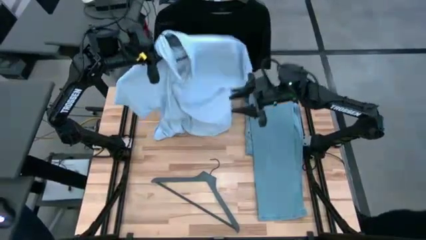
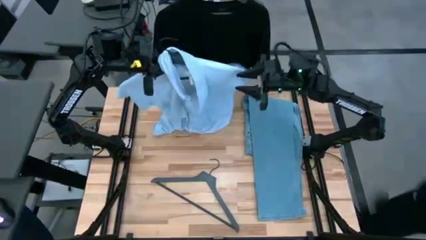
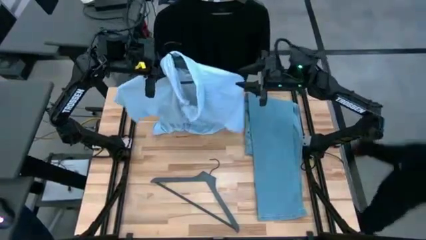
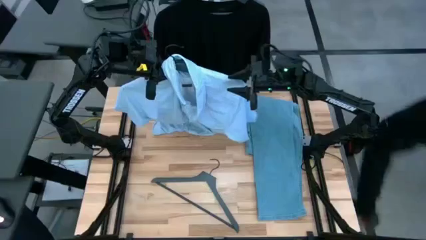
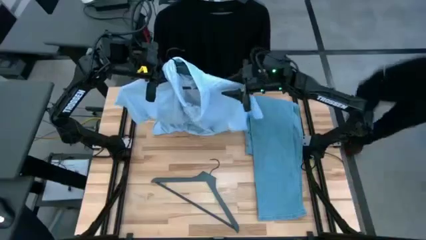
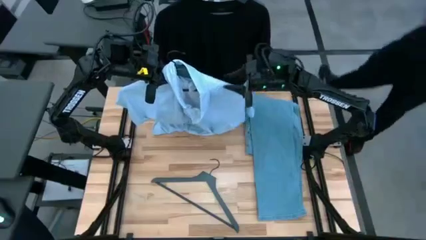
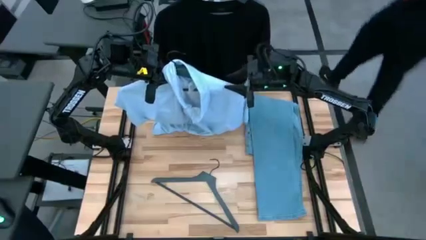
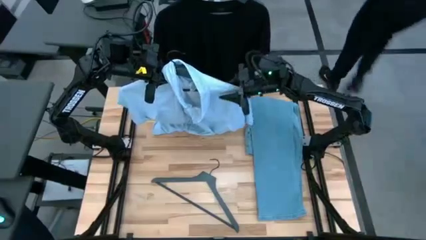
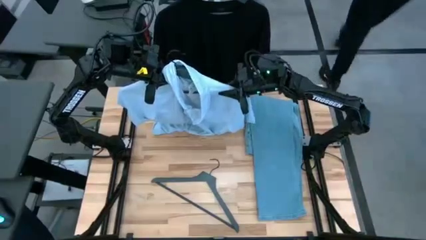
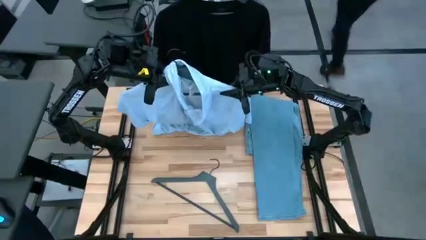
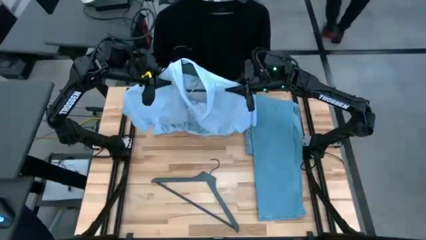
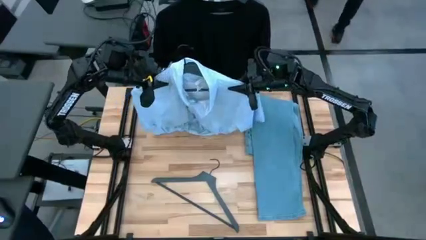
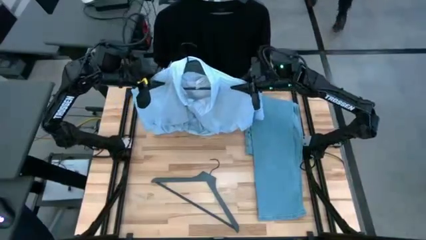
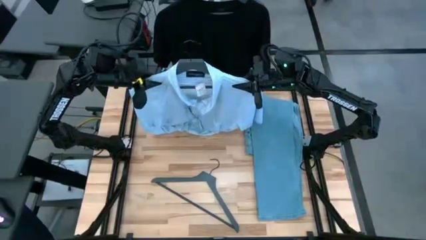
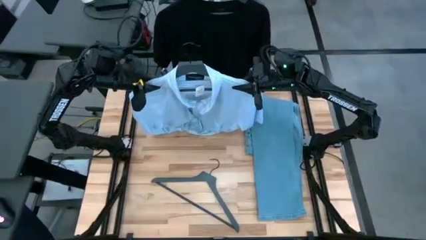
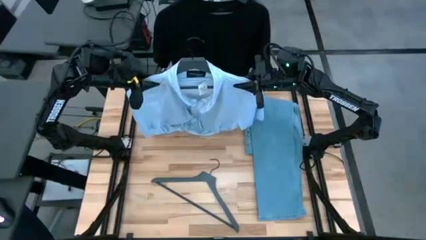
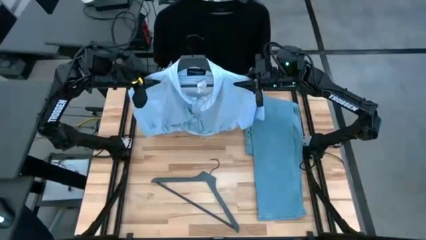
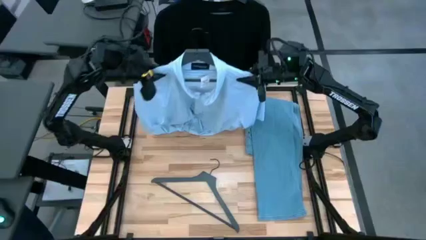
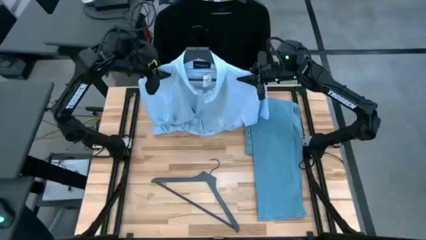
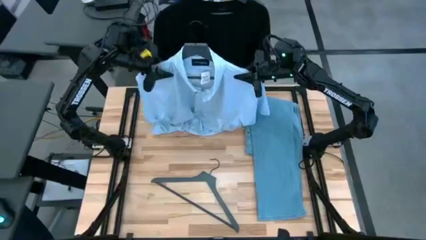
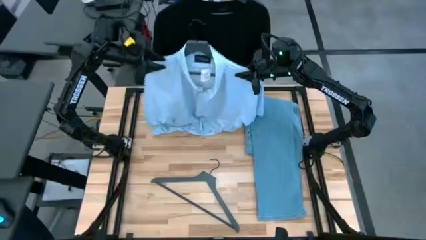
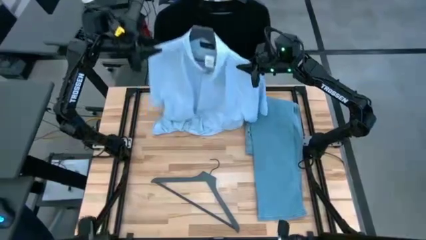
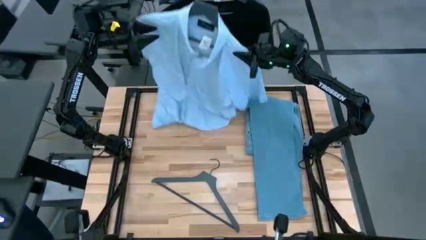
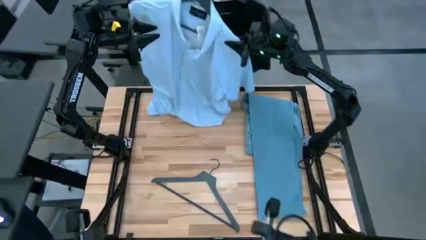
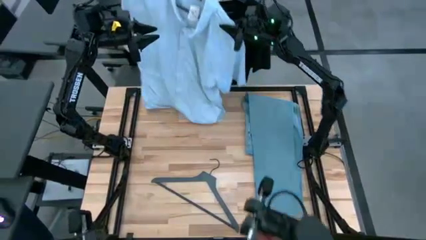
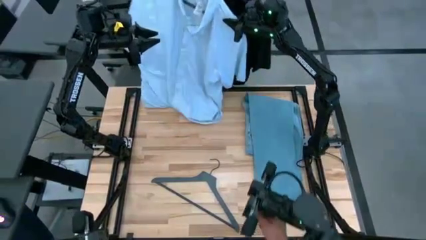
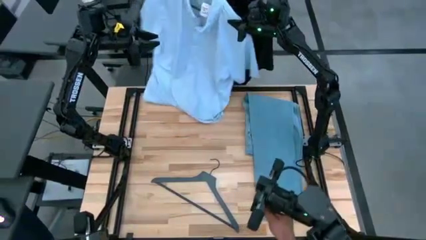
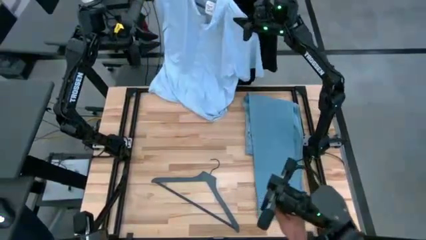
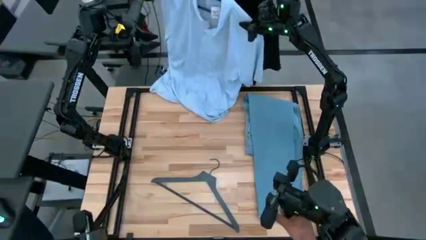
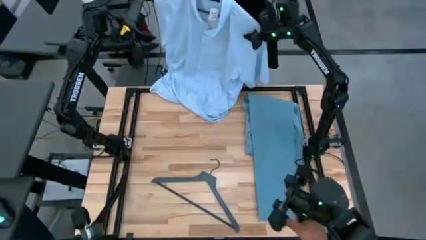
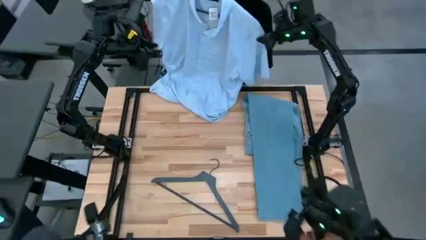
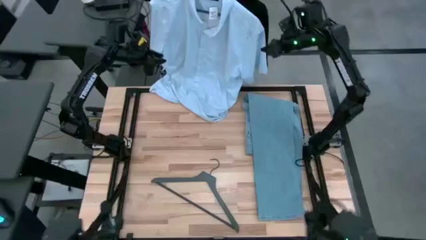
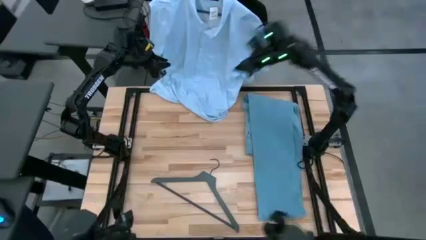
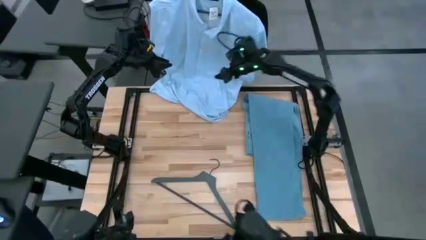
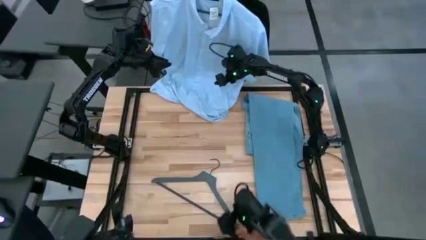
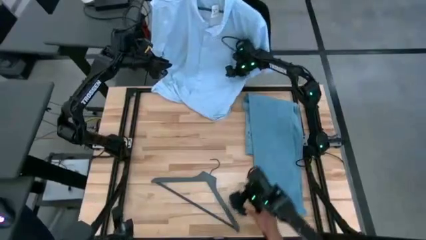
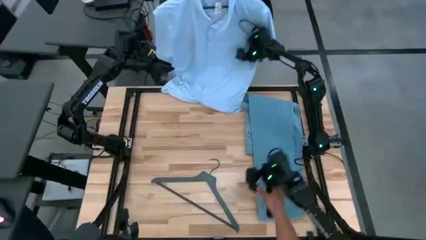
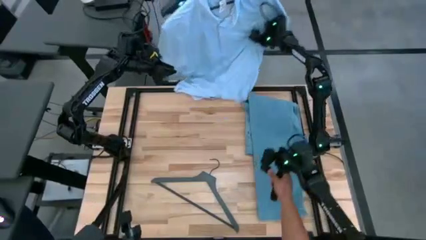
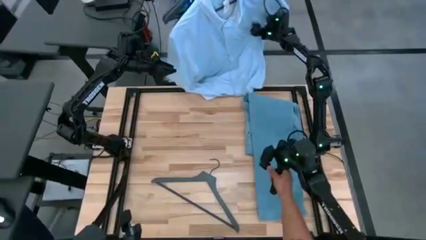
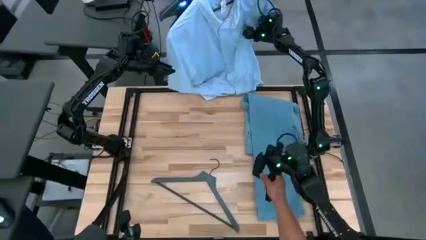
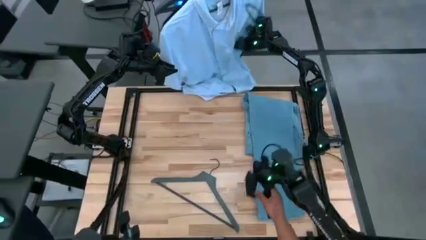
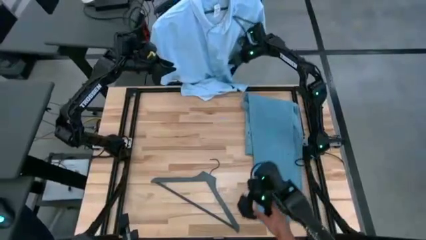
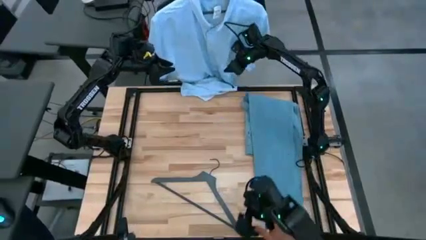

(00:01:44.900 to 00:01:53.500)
Task: Hang clothes
Hang the blue shirt on the rack

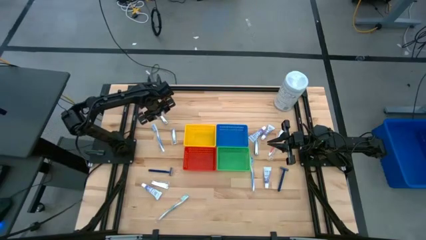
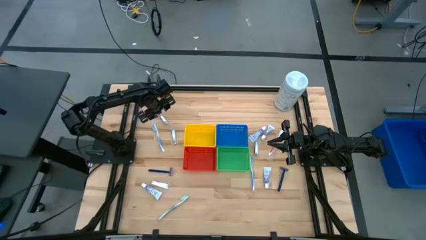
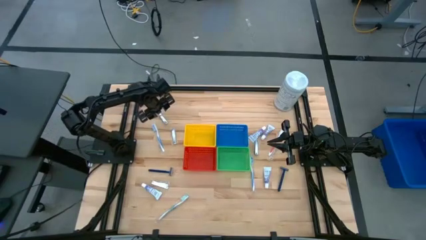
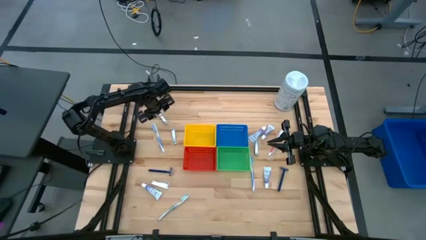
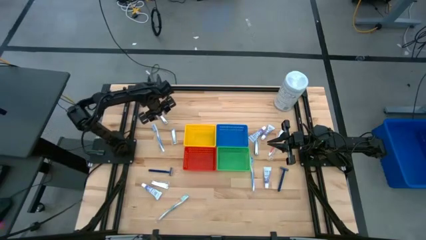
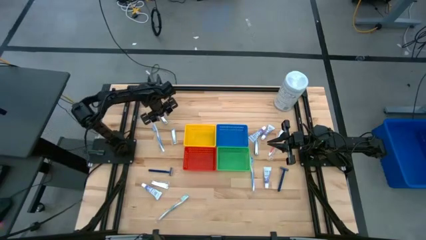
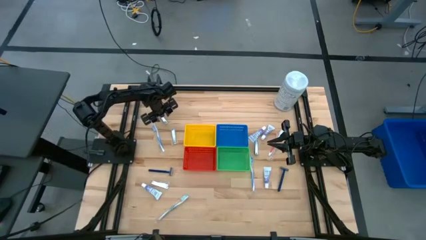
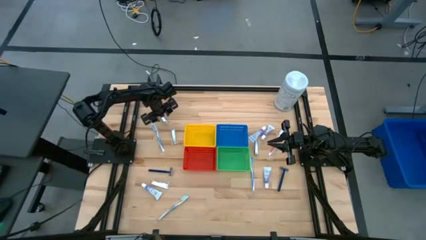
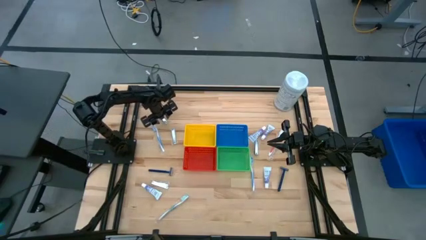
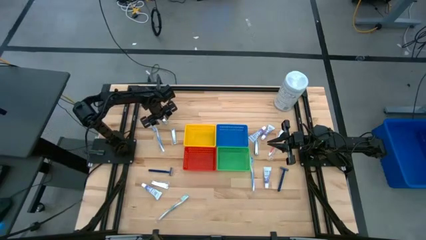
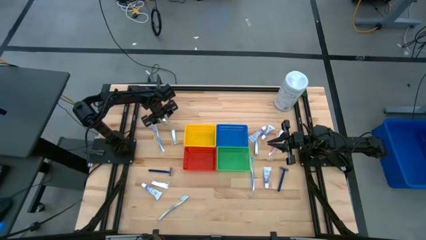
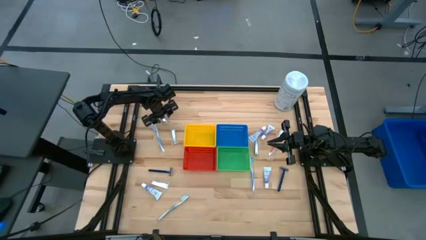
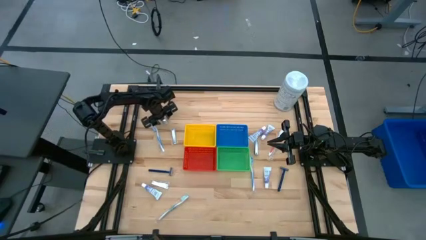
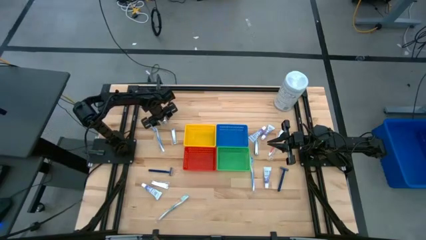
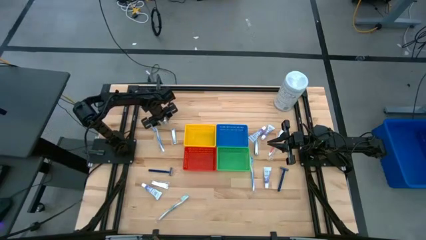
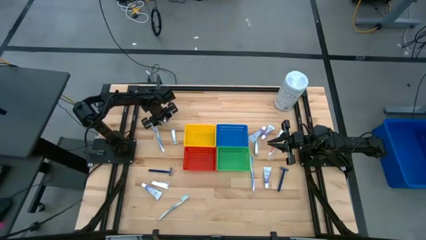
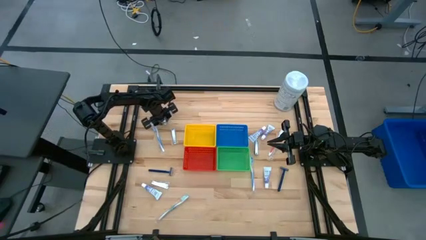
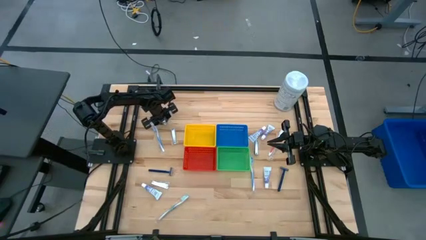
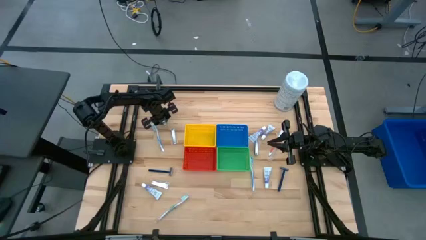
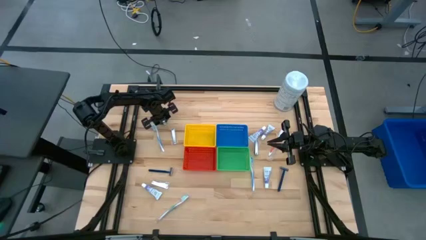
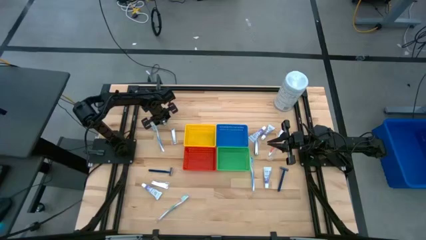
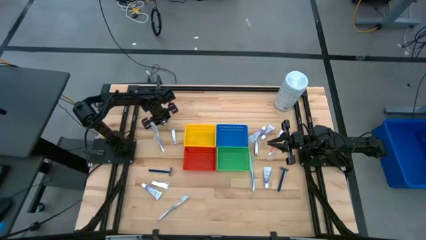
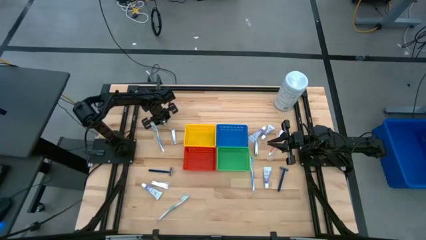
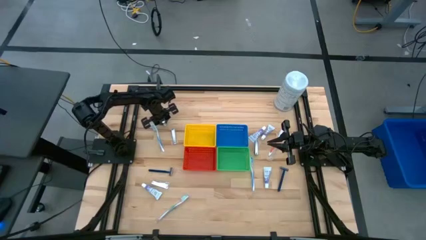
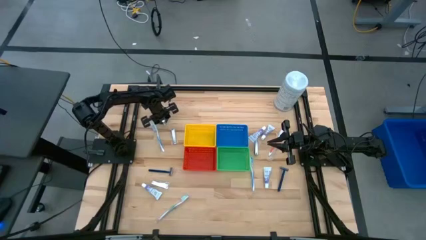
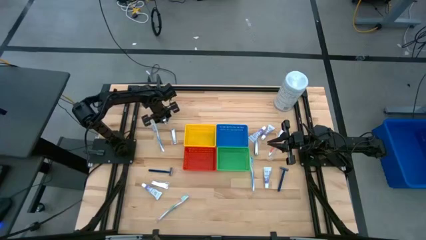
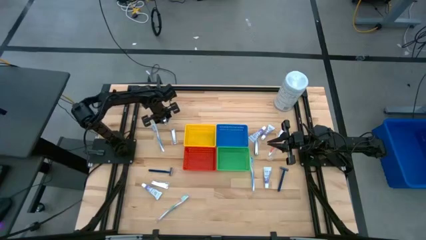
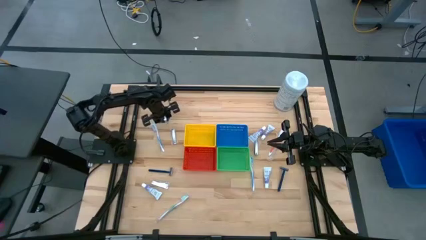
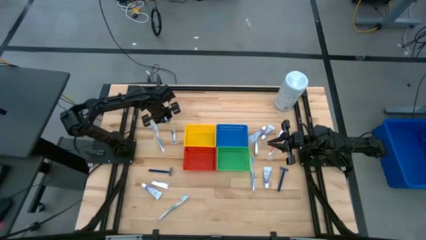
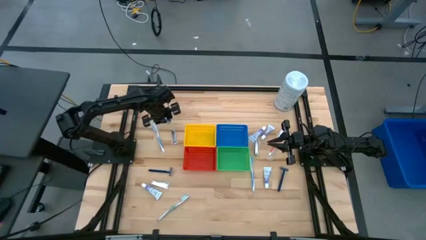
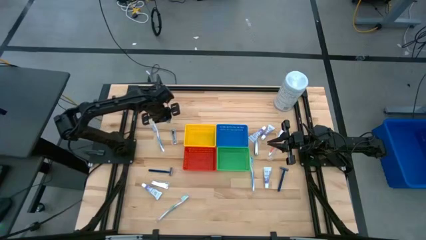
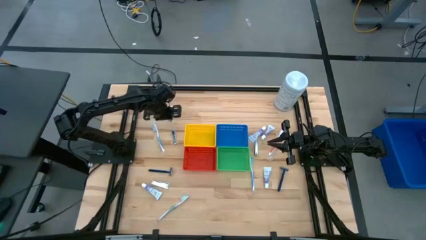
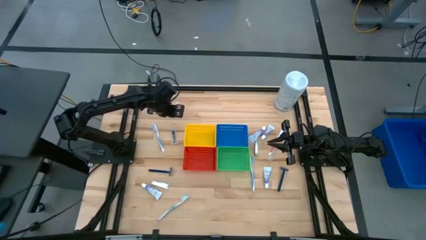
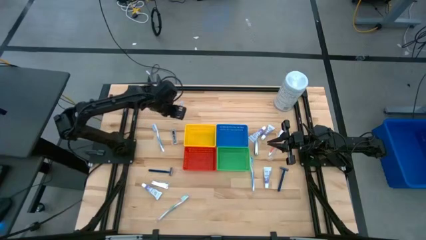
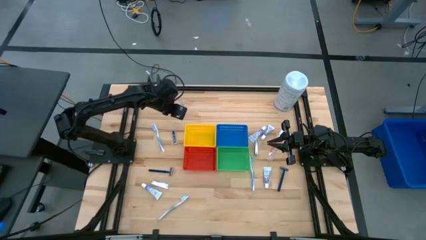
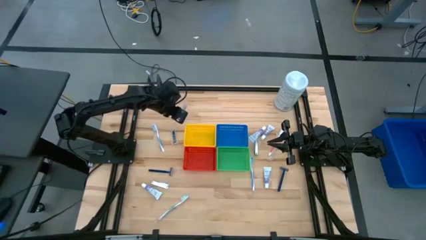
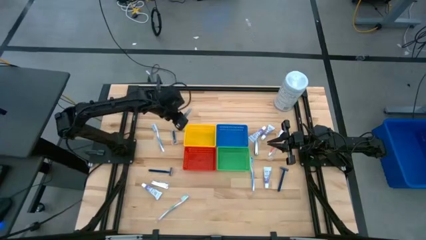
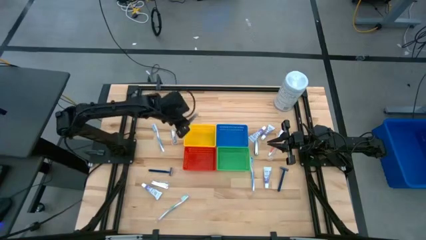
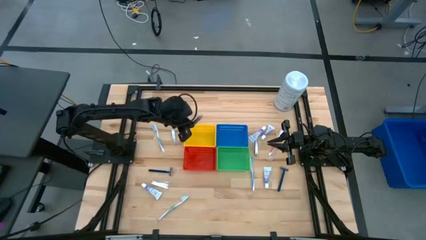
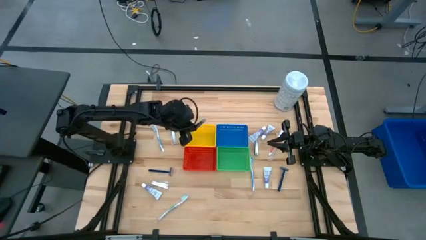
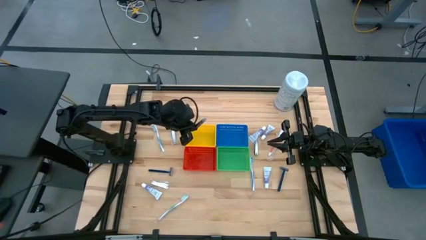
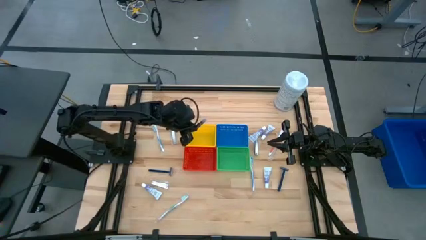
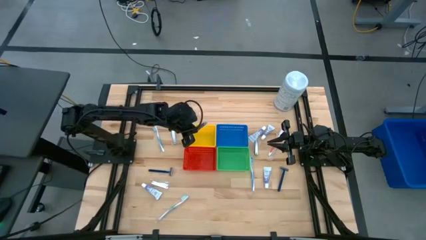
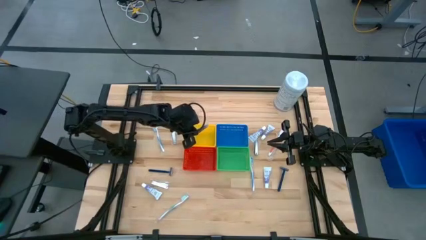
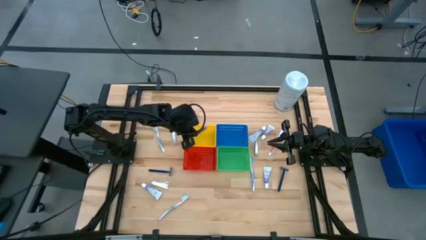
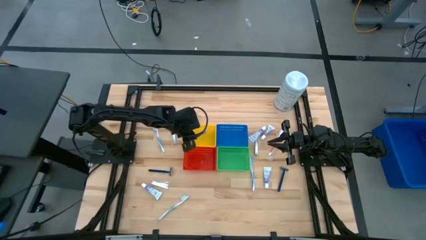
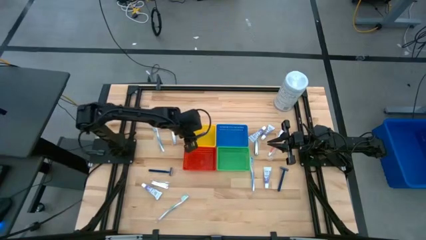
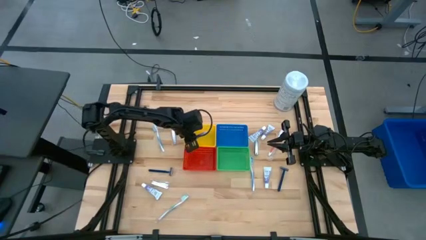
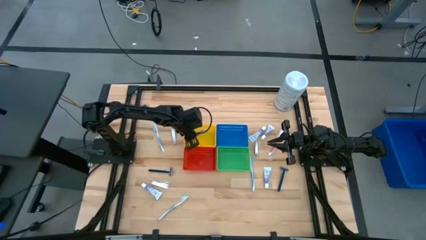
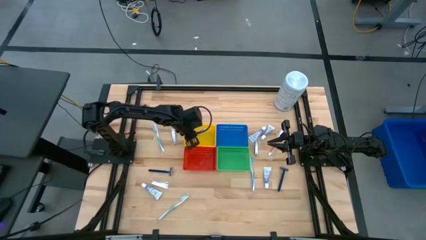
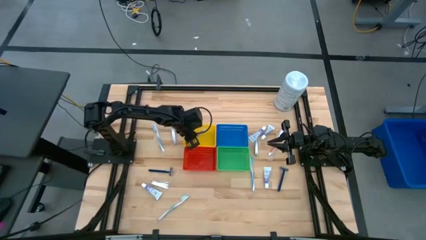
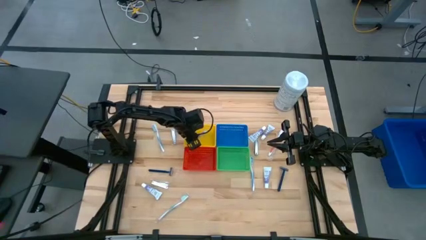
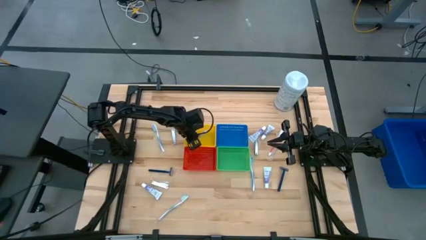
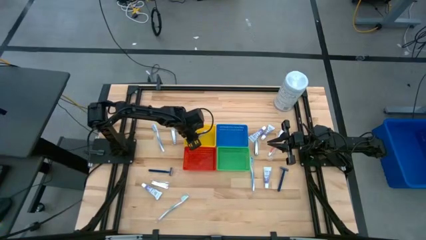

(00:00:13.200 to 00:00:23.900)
Task: Pick & Place Travel size toiletries
Put the top left nail cutter into the yellow bin
